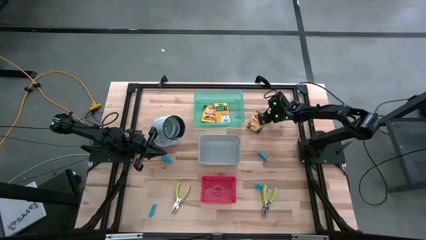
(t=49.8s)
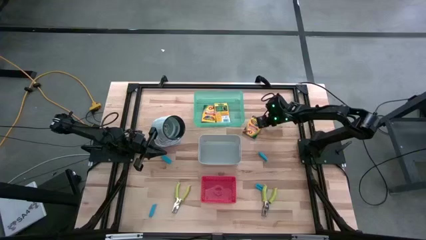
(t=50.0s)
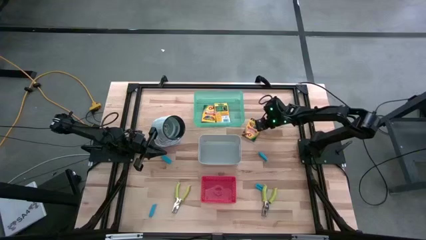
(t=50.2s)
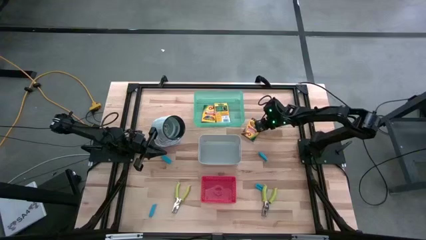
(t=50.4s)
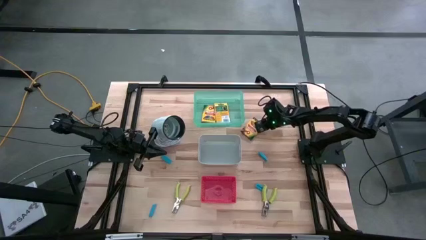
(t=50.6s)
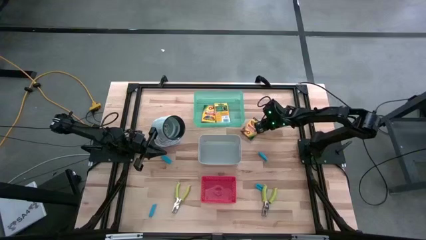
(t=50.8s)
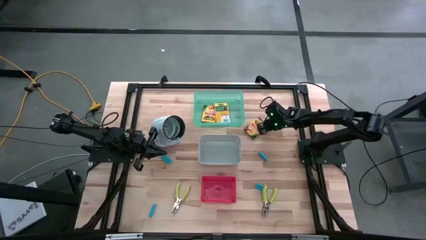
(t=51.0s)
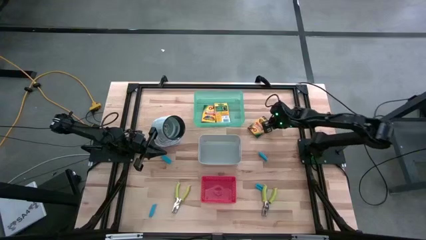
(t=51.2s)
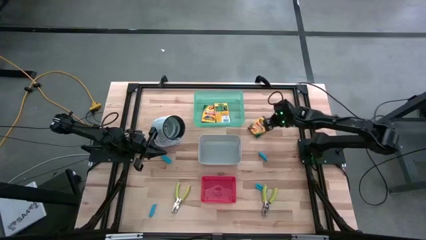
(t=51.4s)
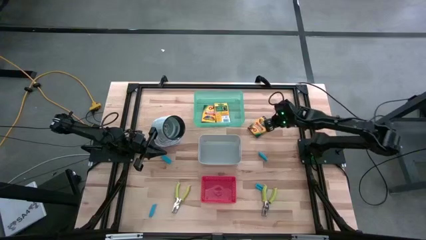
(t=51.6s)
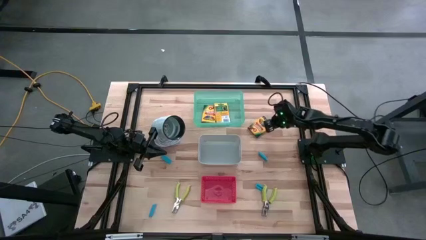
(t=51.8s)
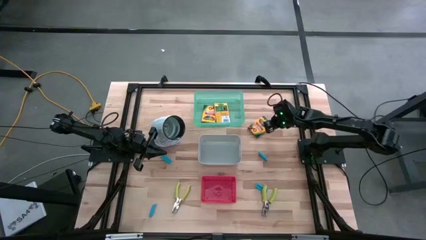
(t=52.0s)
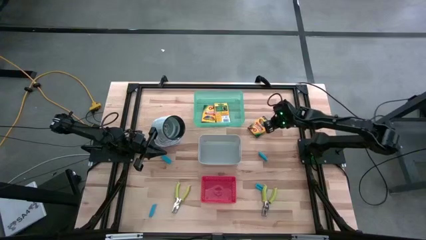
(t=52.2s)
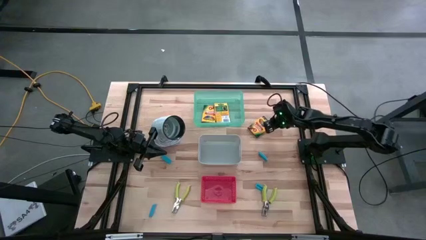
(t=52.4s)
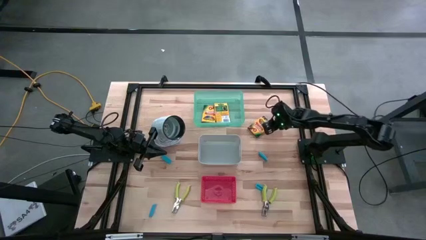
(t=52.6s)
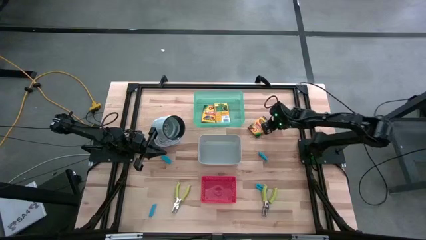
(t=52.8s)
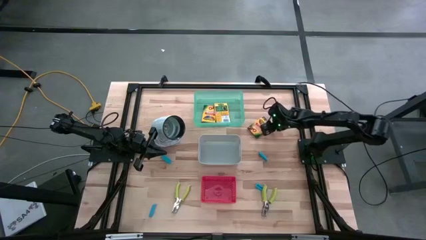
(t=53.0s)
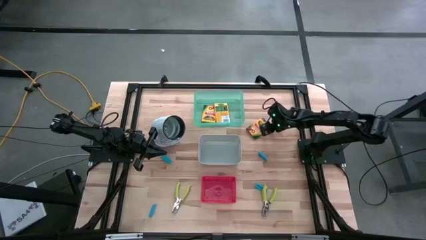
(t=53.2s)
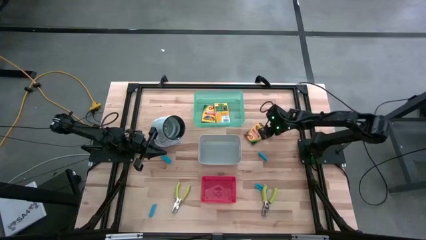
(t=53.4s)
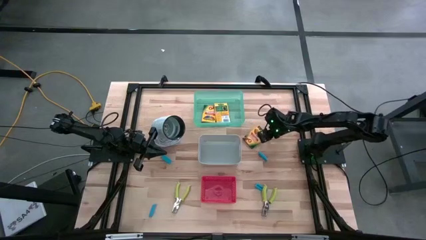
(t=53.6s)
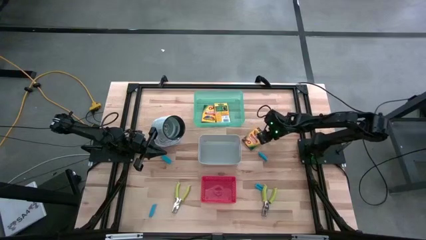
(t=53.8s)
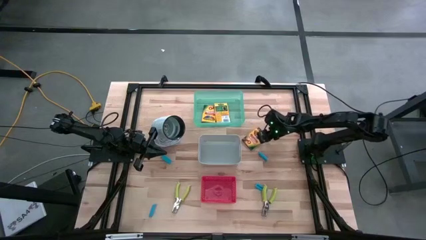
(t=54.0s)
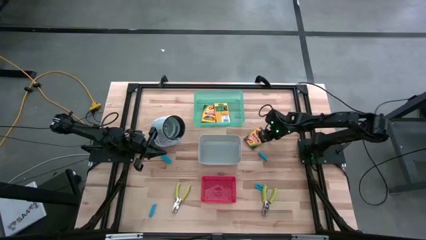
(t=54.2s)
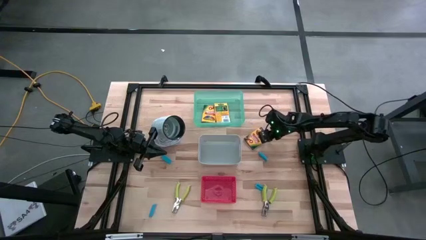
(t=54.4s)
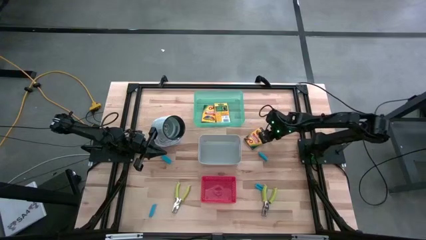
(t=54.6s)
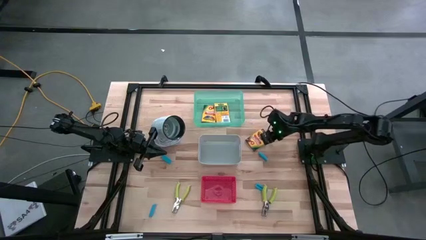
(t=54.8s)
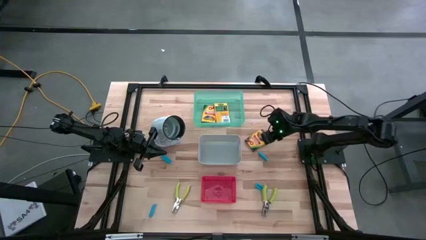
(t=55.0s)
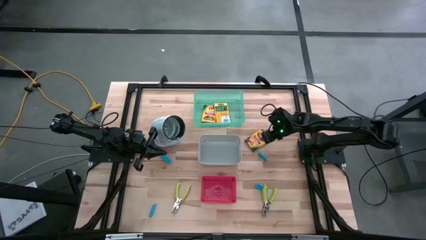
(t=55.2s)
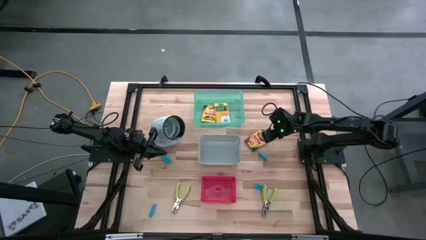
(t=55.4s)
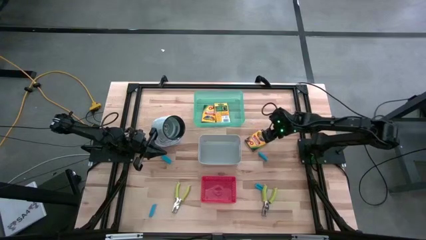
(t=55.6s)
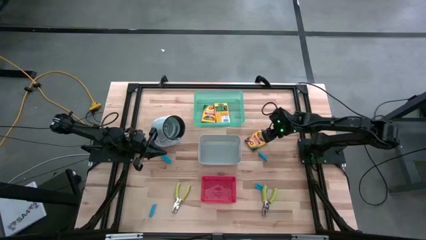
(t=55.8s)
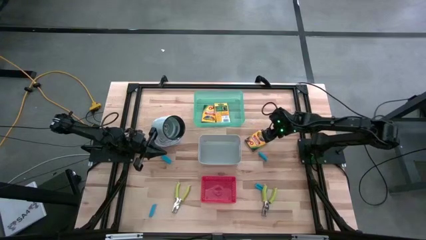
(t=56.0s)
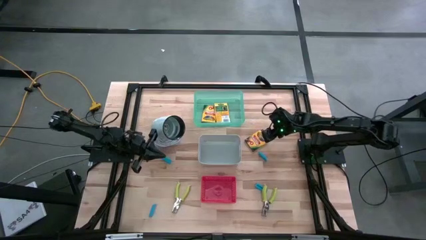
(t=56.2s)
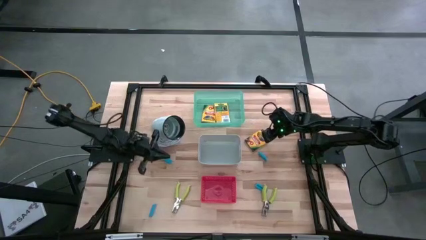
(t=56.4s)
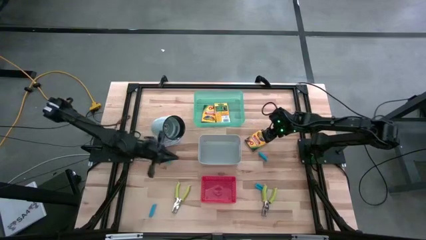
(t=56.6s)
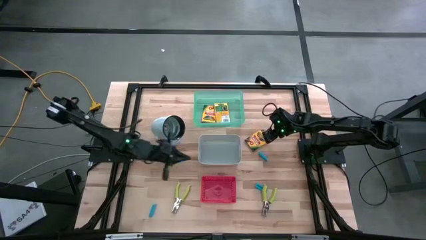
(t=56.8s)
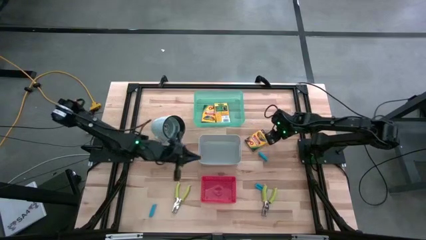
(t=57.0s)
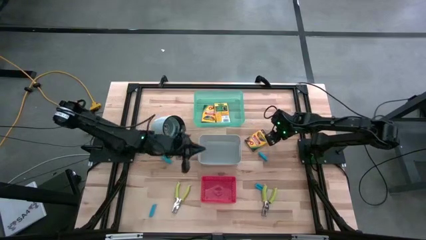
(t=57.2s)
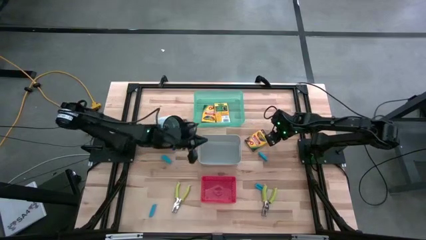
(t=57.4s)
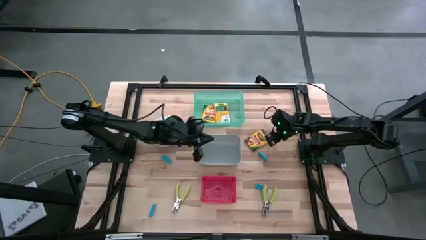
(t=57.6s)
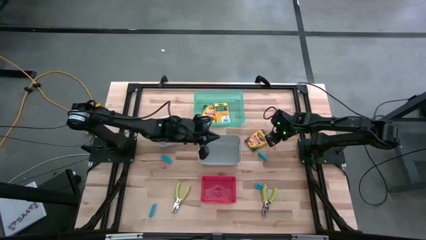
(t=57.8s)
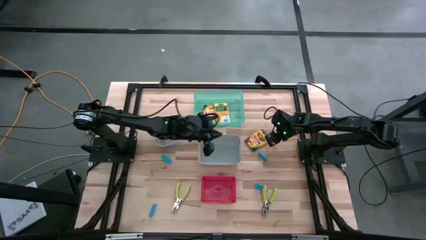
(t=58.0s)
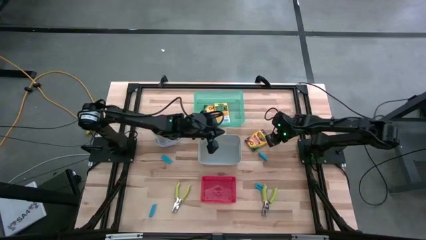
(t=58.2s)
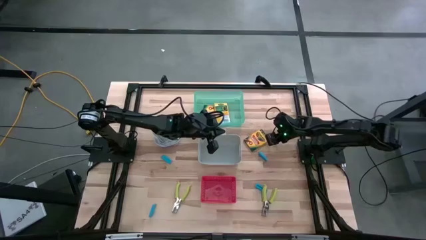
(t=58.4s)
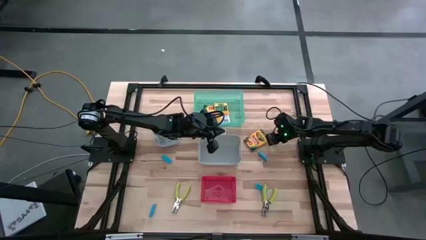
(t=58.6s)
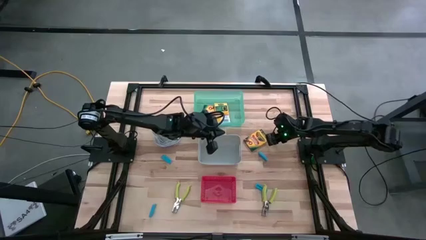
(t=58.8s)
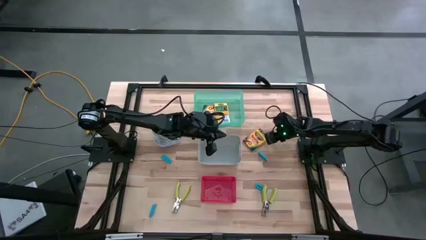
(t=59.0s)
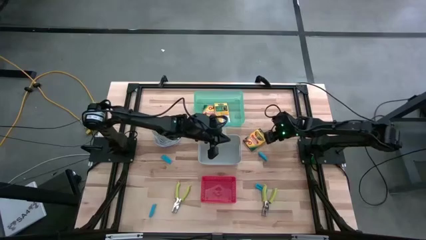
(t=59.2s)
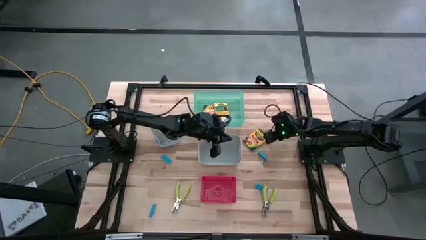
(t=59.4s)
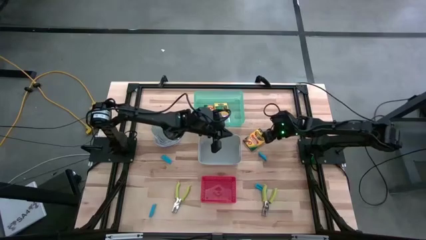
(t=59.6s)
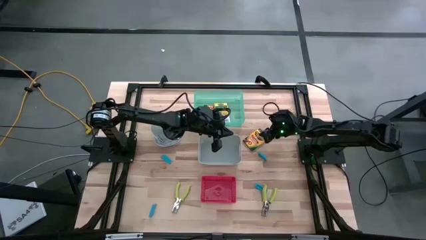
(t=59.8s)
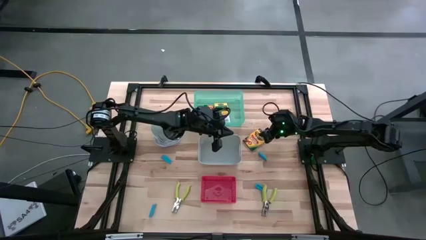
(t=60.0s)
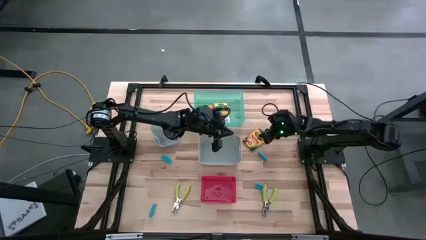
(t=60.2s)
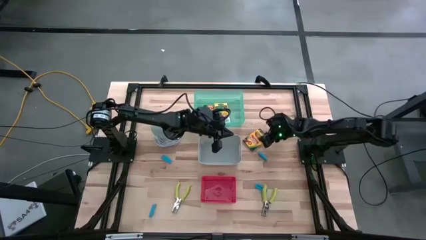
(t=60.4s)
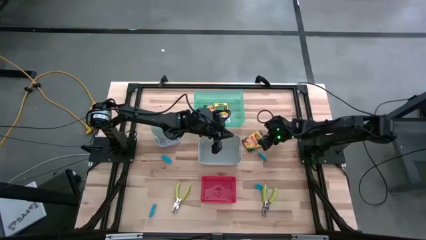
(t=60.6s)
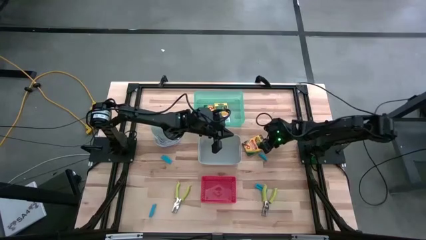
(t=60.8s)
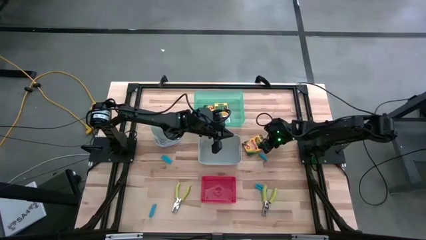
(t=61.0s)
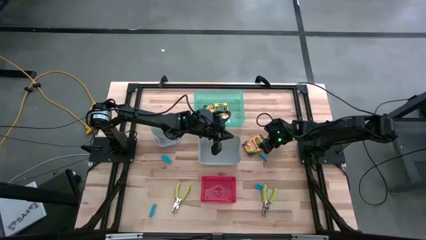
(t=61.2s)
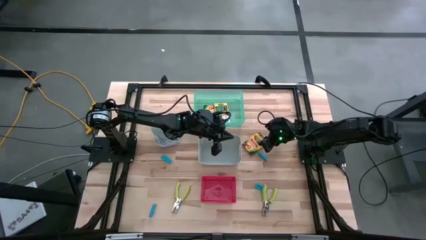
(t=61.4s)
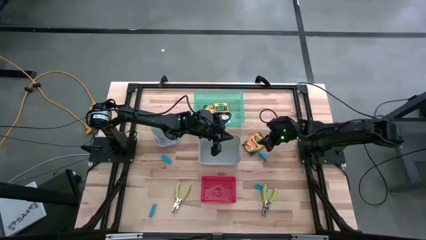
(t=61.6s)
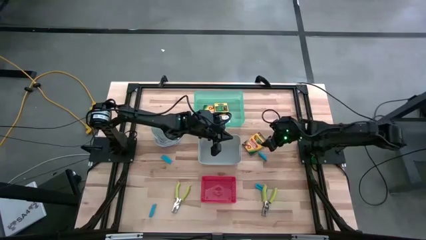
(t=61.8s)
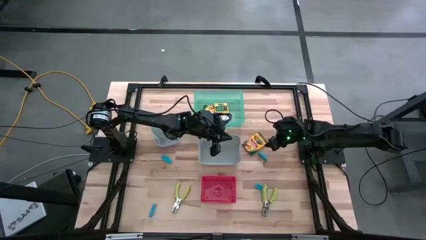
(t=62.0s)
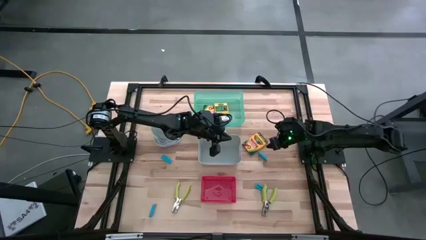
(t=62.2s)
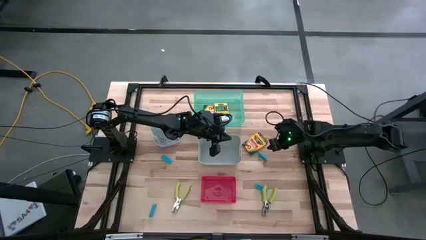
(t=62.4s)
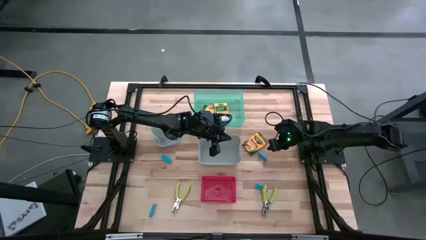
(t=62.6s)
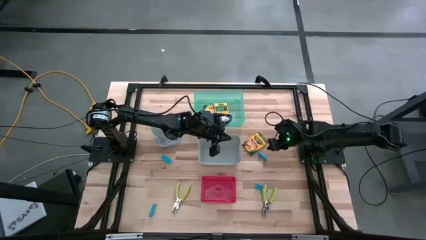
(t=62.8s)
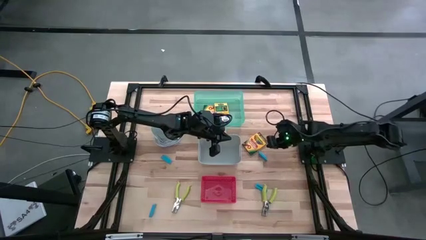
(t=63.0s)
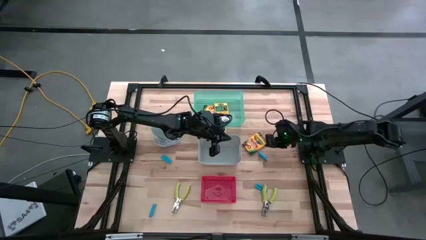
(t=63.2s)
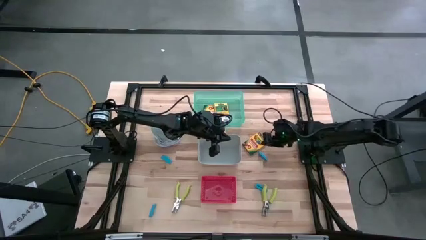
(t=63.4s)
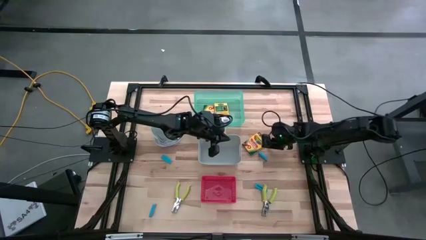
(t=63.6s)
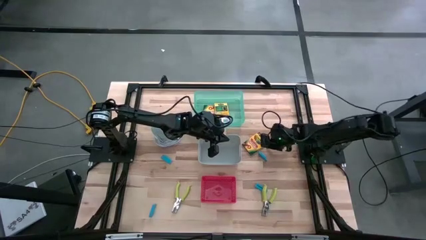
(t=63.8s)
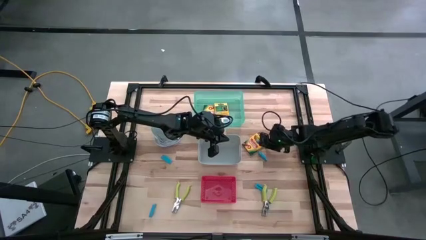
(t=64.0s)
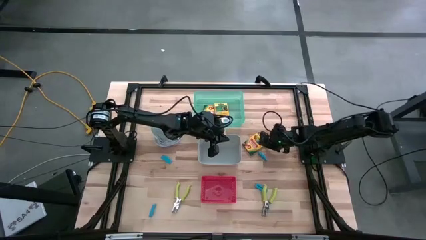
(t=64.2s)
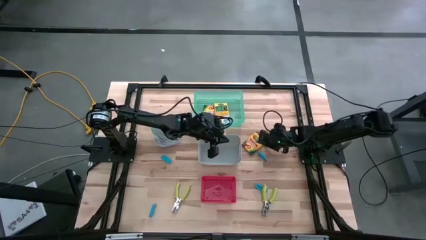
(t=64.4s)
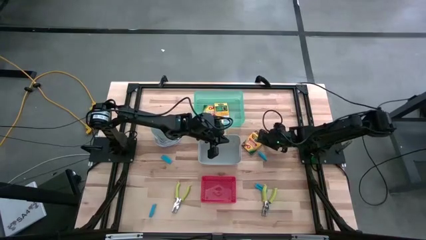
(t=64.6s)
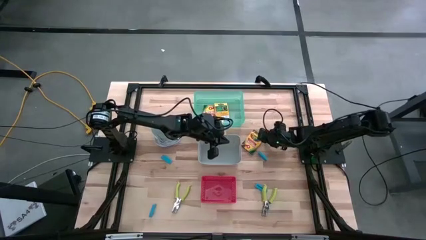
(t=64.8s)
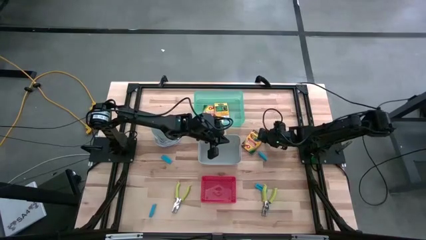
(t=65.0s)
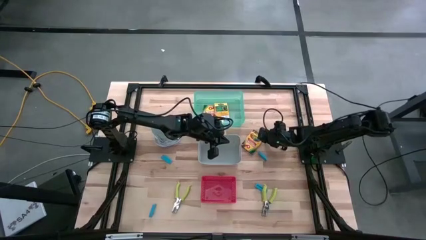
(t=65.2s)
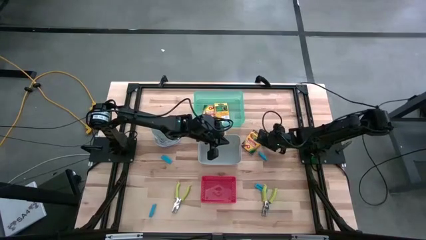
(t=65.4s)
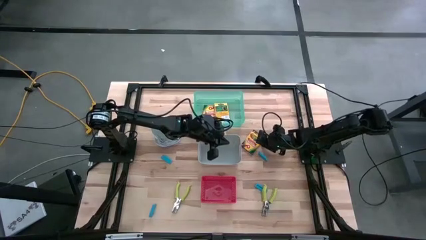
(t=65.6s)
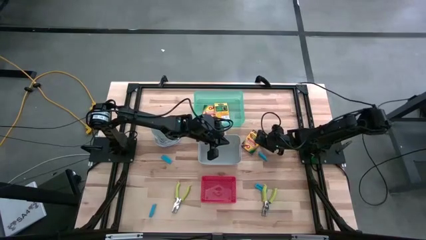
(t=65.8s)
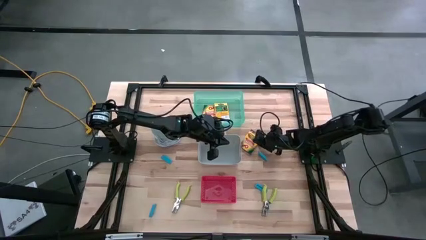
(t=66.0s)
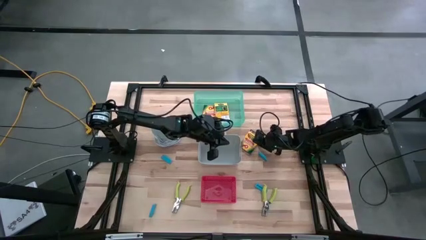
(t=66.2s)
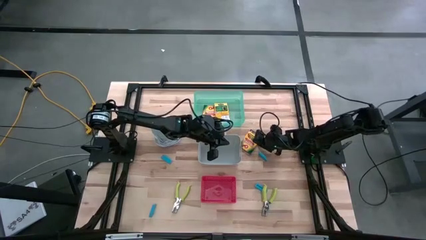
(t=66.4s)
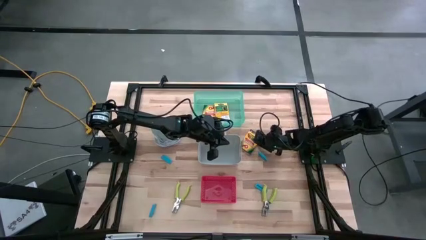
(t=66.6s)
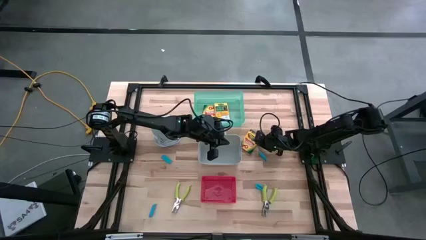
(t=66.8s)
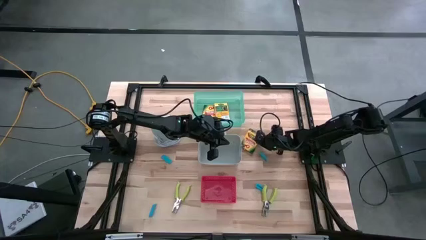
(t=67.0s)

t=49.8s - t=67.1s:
Task: Pick & Place School Supplies
Put the yellow crayon box into the green bin
